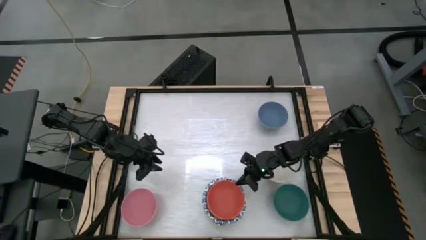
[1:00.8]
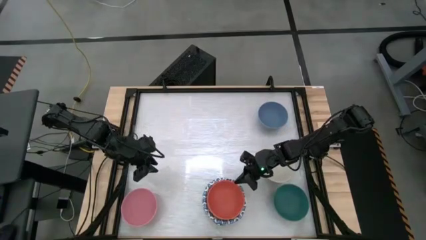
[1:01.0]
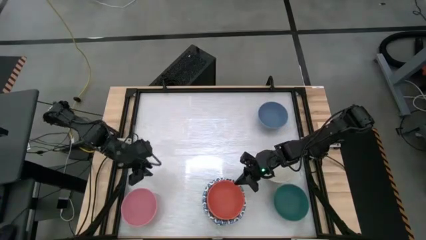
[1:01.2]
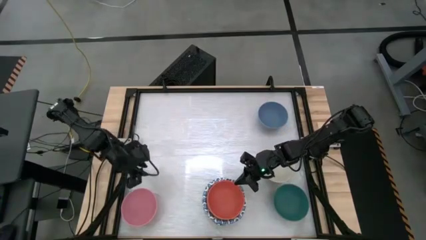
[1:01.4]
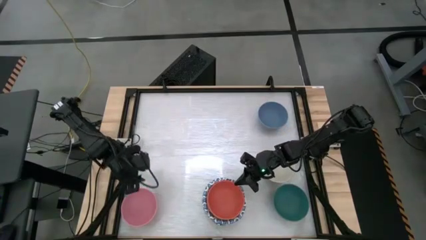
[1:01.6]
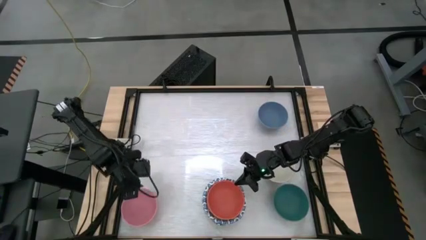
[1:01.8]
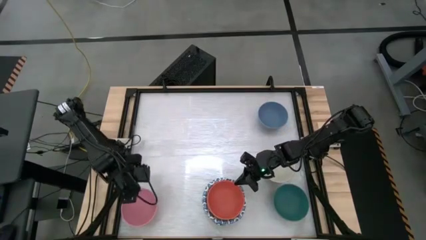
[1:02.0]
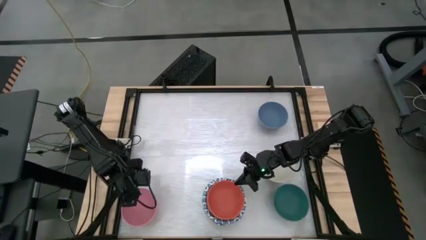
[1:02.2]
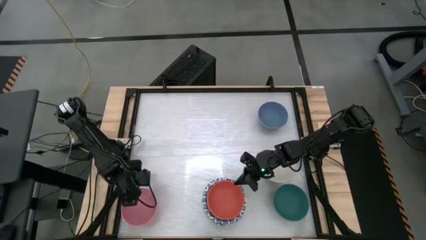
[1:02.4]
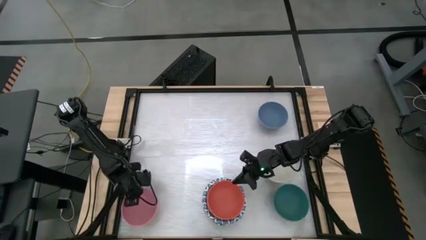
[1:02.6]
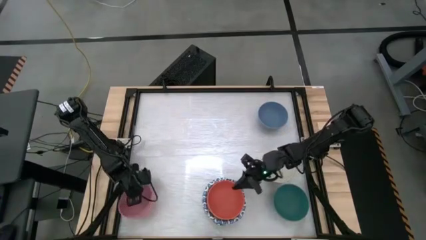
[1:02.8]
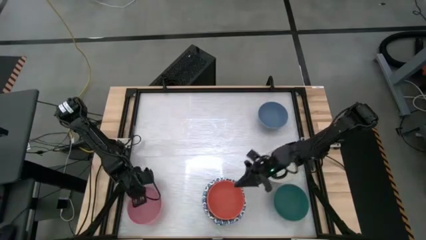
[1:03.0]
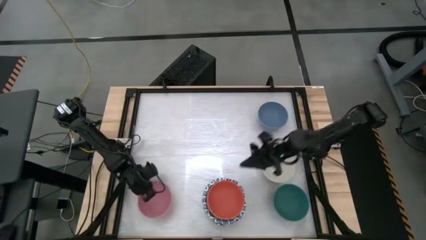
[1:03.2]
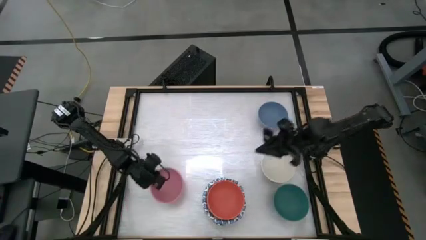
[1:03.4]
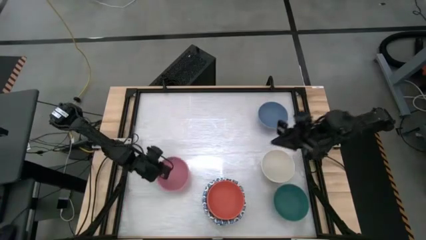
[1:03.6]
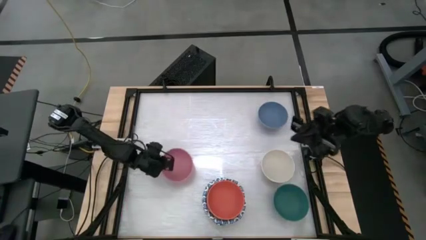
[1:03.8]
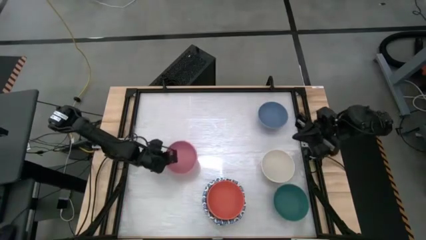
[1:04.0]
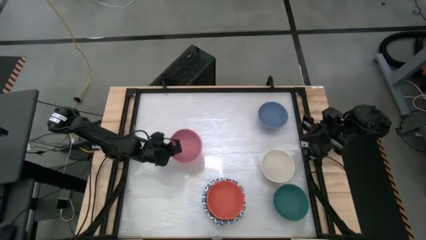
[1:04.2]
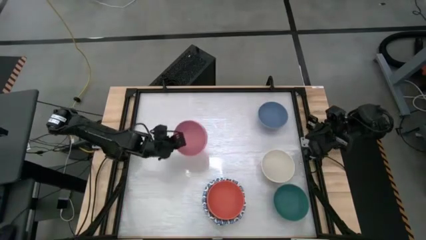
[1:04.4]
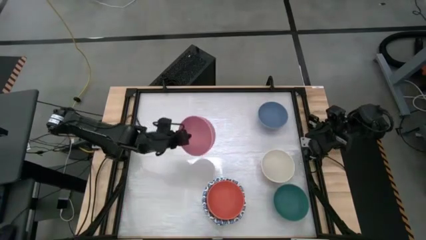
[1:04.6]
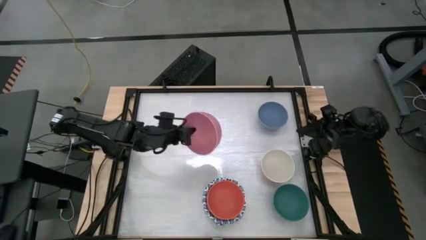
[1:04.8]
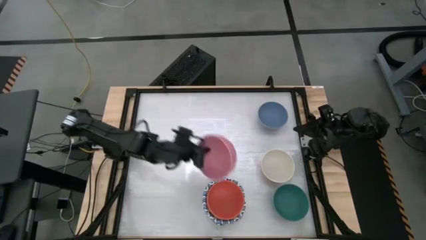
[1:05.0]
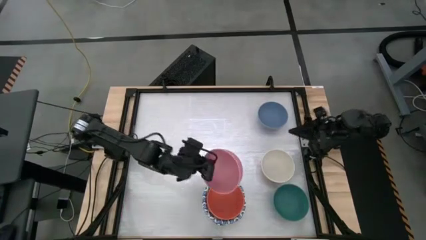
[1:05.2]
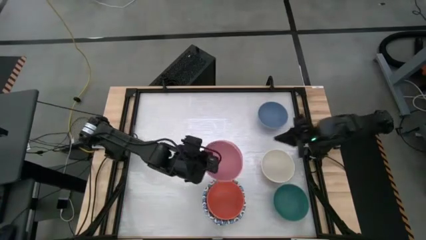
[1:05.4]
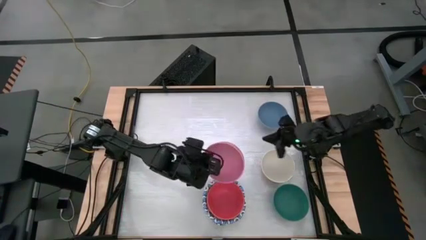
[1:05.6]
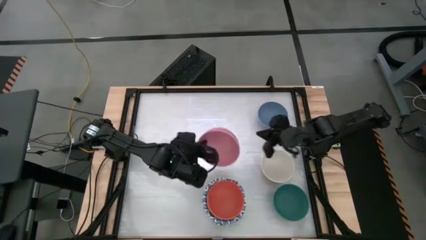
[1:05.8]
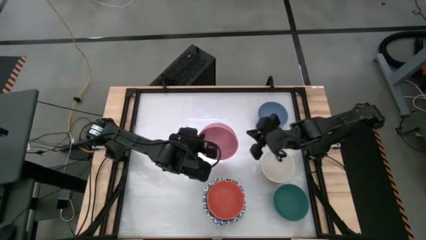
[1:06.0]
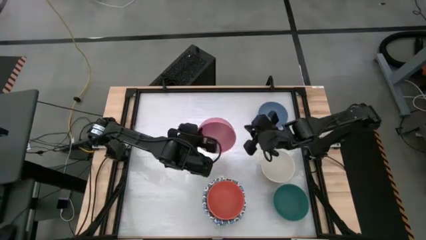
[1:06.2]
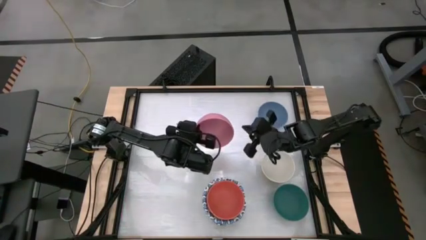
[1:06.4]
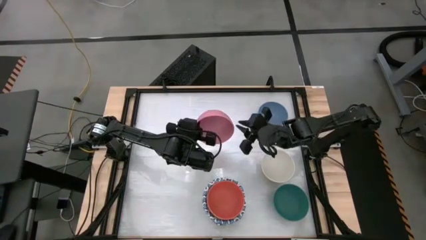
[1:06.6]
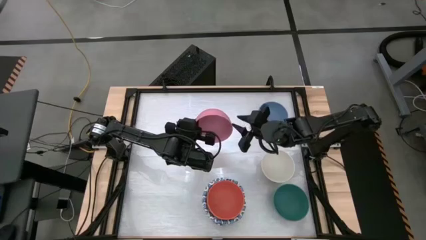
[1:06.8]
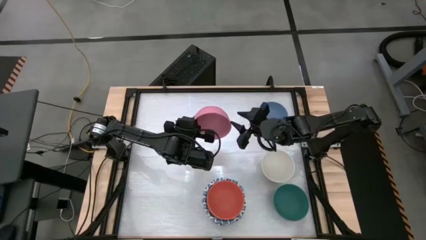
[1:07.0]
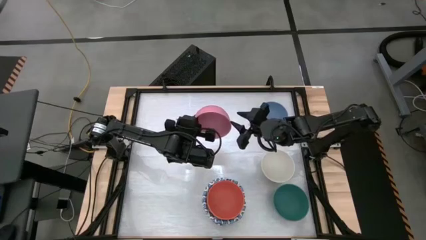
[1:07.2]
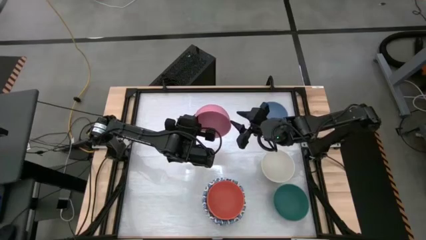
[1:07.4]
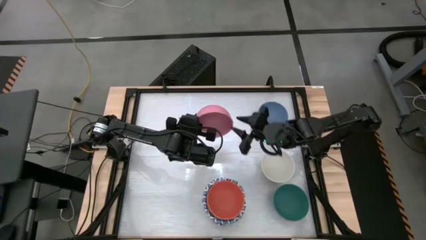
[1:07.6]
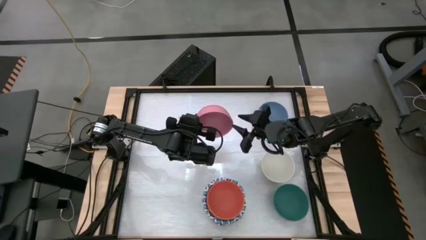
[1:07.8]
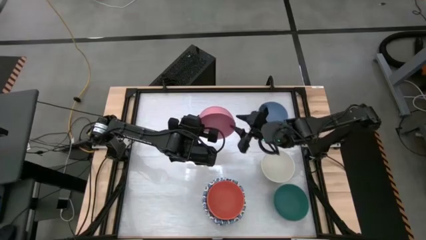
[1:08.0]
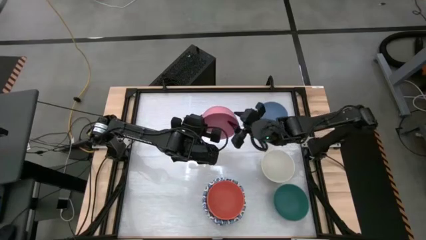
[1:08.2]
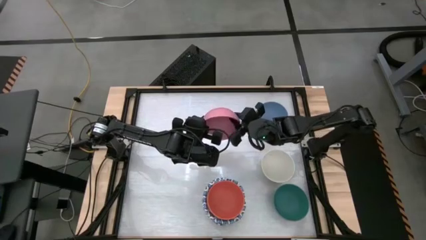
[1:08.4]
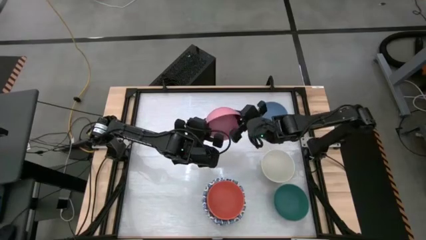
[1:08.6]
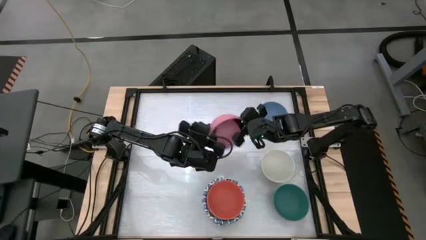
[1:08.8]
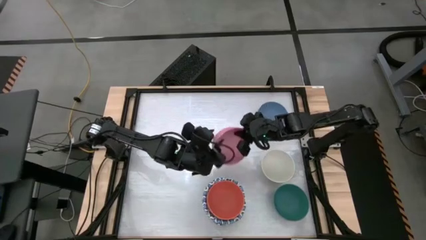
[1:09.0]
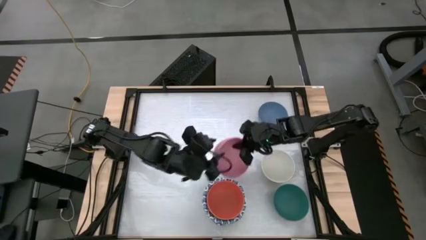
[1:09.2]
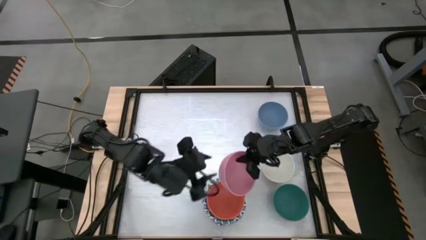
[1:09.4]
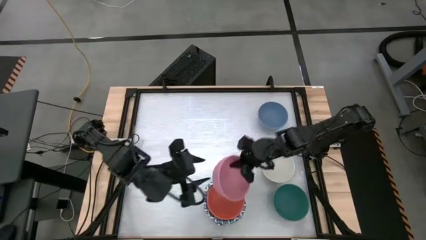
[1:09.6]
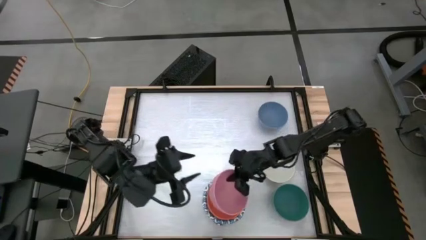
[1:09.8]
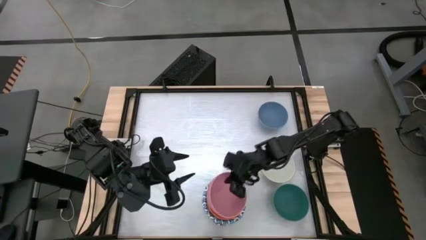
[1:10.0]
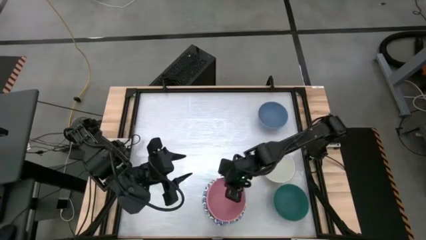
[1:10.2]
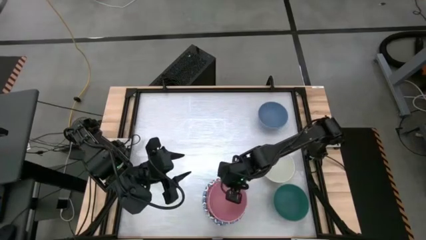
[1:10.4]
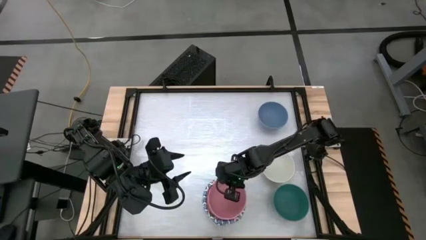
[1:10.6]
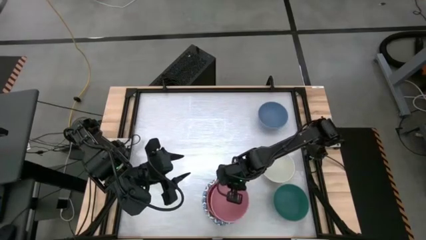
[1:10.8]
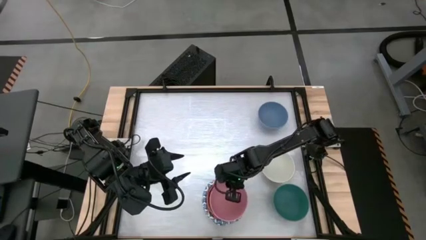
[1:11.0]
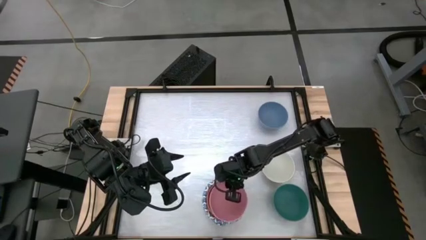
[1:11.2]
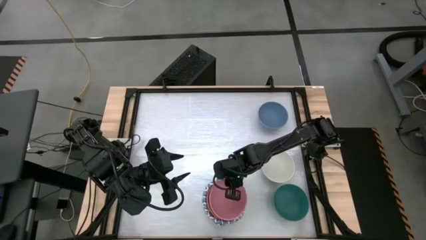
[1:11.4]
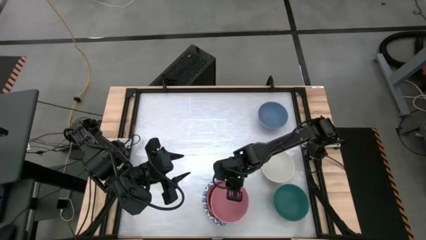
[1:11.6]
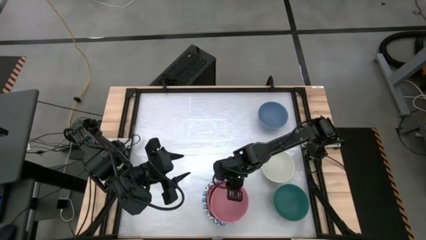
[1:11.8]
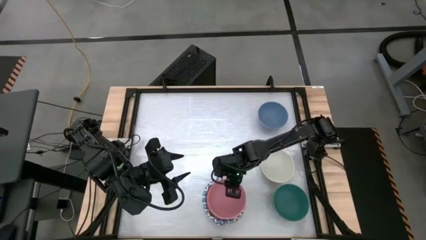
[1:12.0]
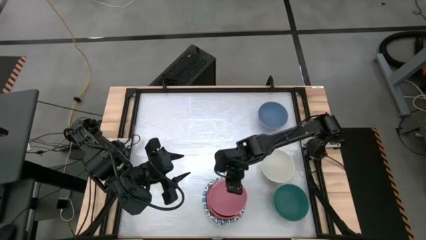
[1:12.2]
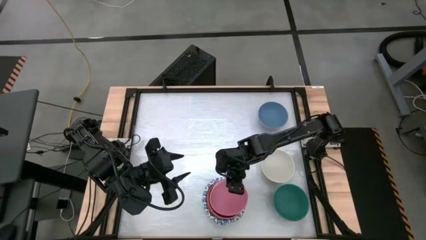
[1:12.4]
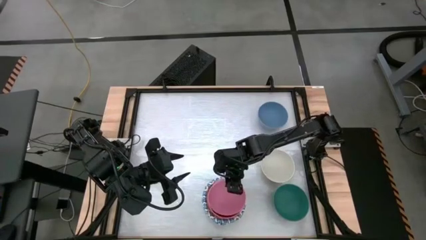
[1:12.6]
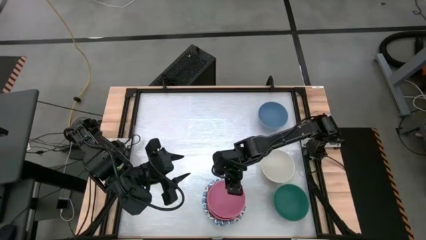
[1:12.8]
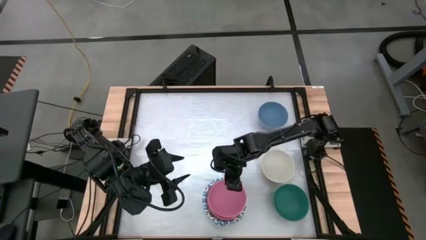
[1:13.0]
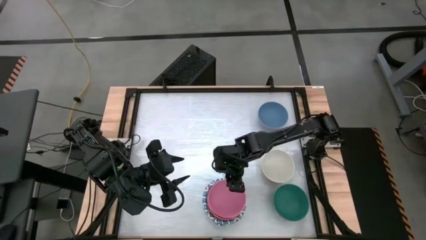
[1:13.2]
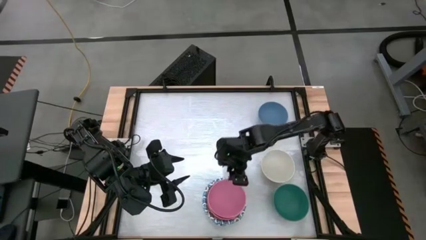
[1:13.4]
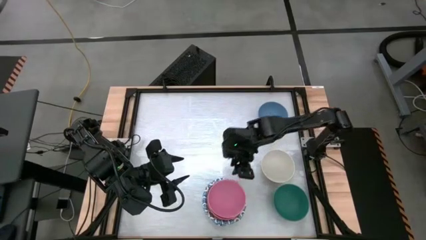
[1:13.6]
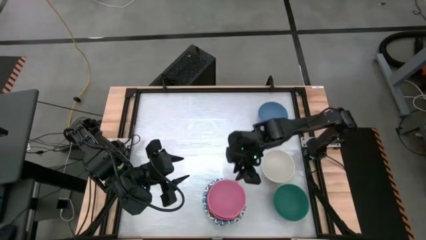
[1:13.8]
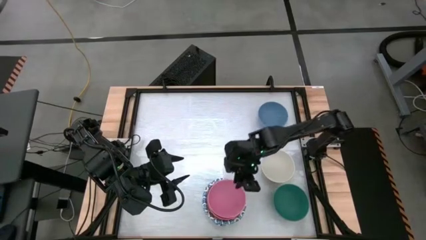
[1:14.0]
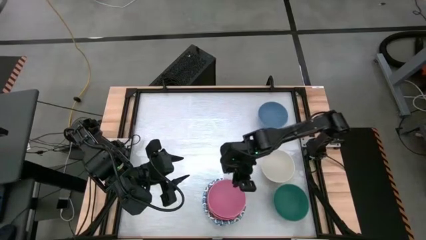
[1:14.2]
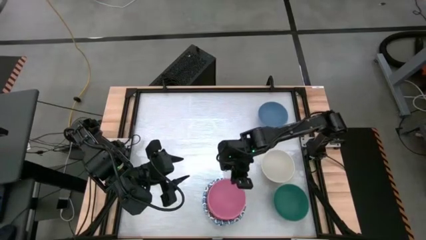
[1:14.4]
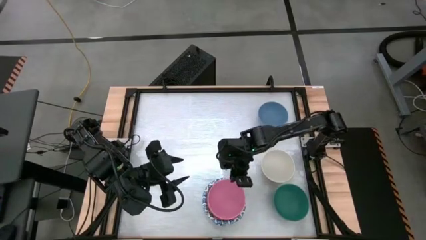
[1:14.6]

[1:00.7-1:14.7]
Task: Nest bowls inside each other by size order
Stack the pink bowl on top of the orange bowl

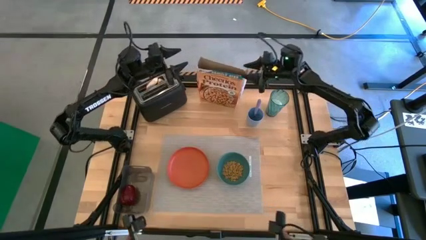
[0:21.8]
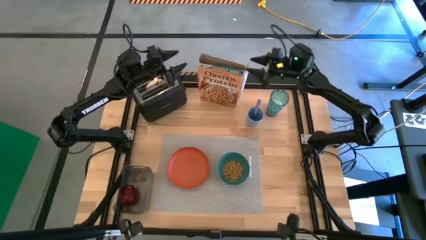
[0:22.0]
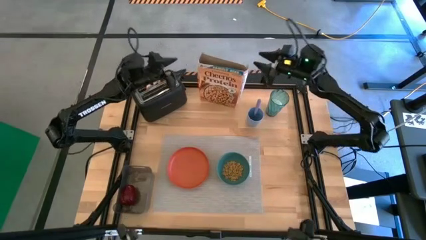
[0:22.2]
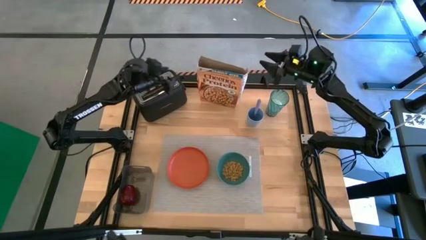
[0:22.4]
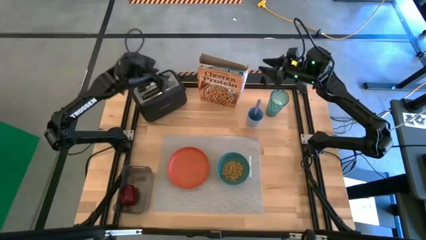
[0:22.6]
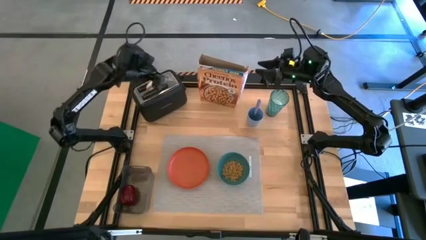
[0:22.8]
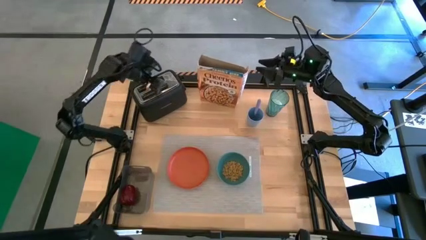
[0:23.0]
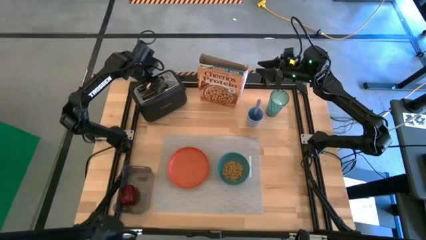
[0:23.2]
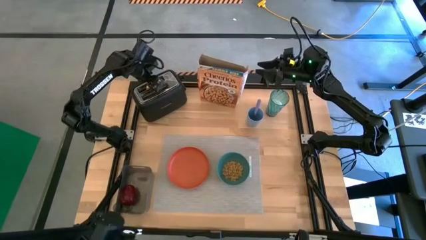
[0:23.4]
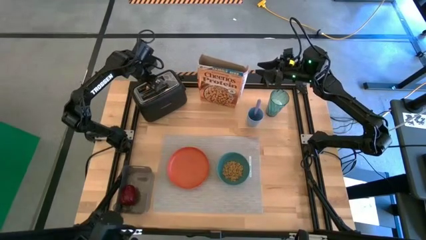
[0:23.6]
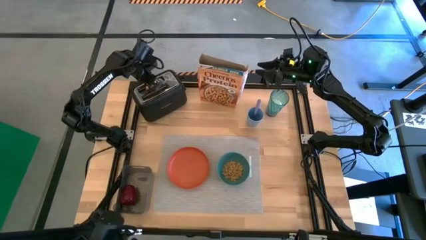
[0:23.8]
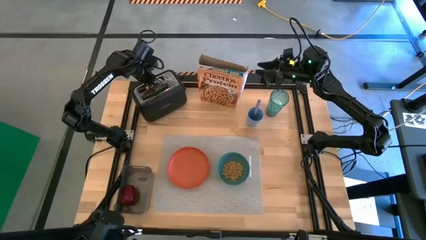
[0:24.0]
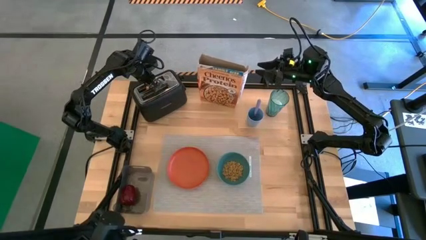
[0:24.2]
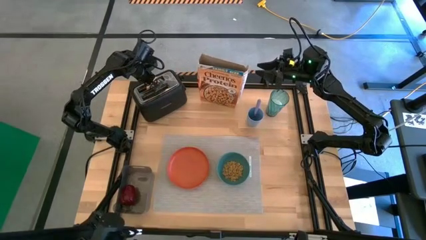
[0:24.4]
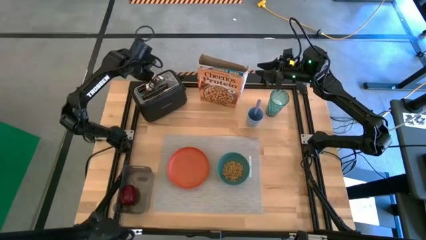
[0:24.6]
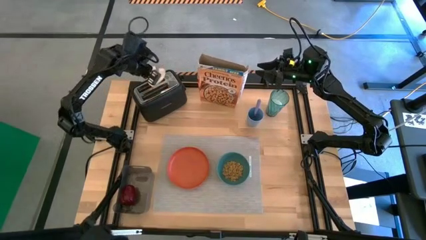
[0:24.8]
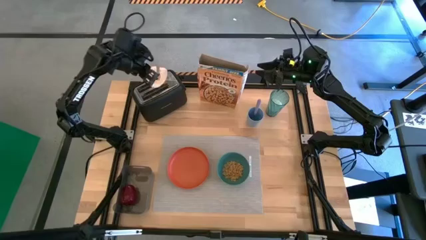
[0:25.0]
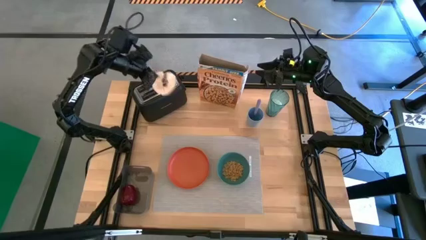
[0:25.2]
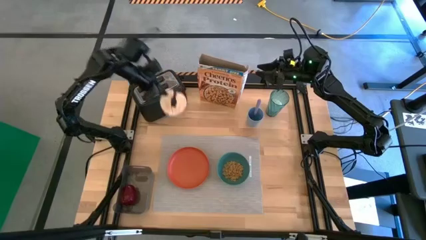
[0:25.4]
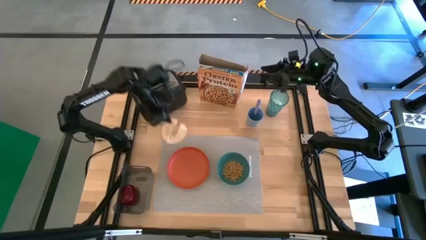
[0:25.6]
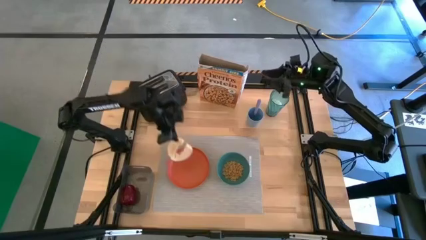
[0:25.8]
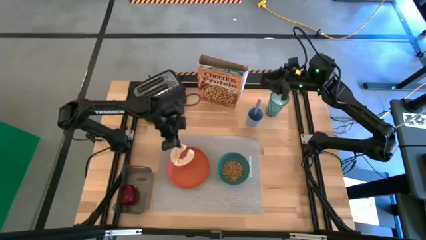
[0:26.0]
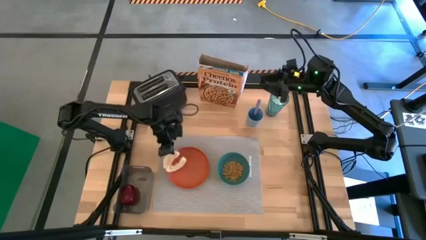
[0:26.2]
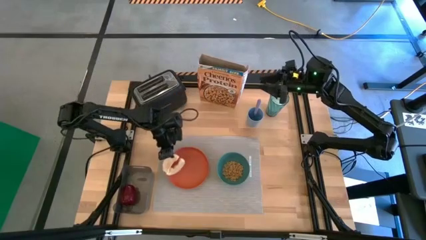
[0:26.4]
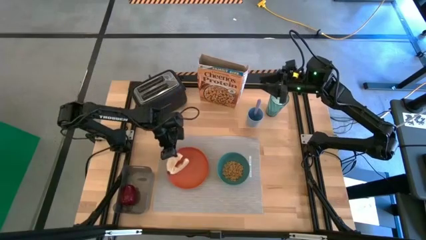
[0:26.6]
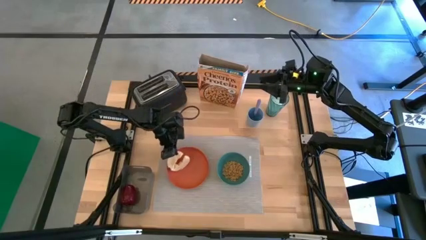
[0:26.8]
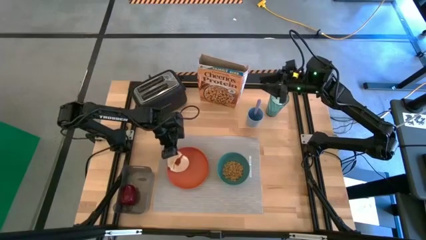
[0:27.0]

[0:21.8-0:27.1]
Task: Arrange a breakfast setting
Put the bread on the orange plate
